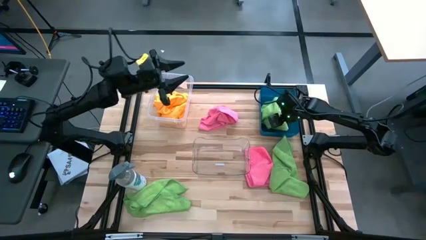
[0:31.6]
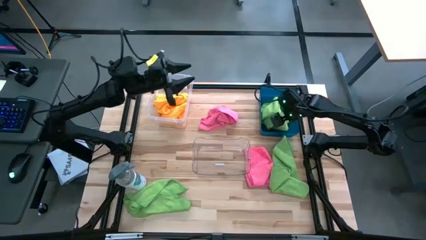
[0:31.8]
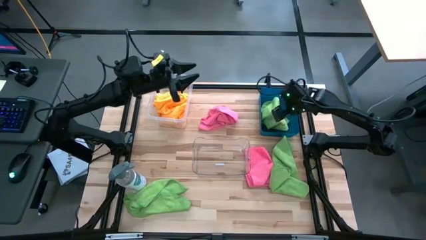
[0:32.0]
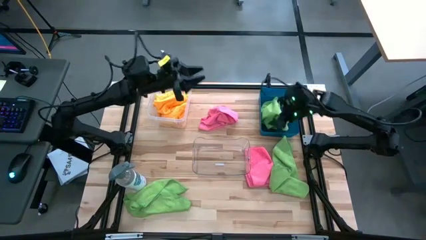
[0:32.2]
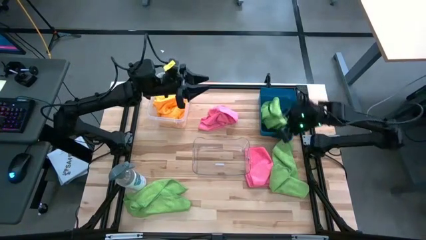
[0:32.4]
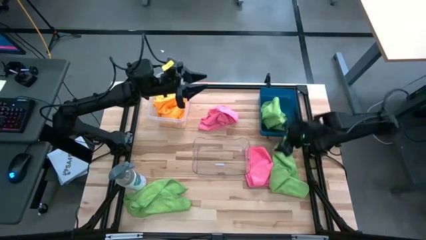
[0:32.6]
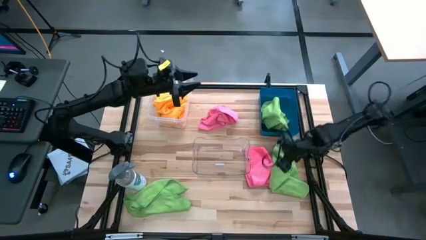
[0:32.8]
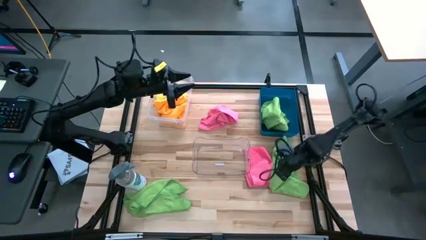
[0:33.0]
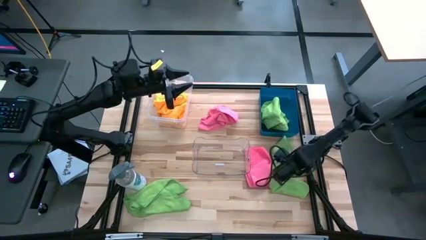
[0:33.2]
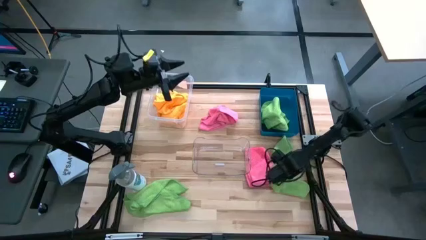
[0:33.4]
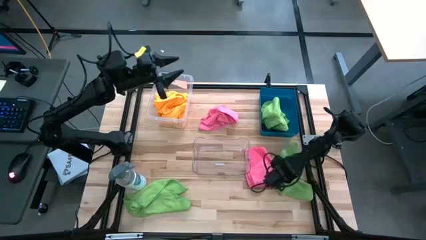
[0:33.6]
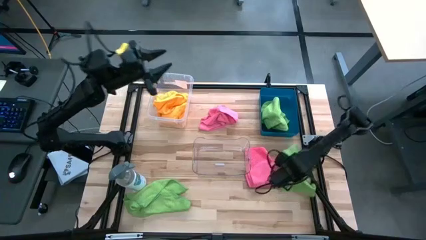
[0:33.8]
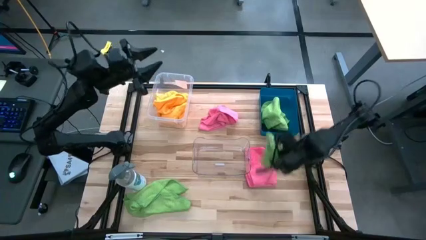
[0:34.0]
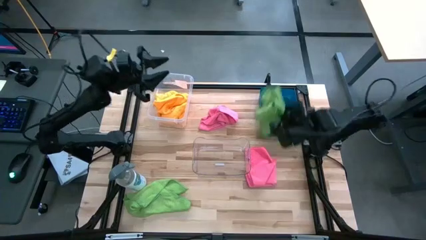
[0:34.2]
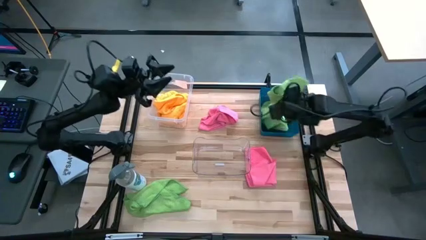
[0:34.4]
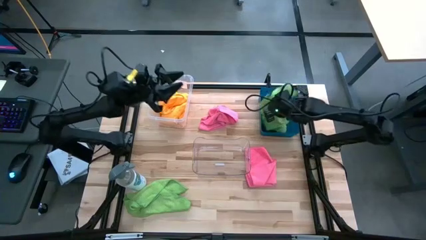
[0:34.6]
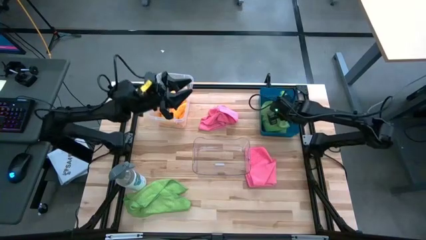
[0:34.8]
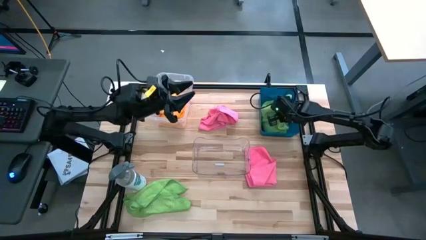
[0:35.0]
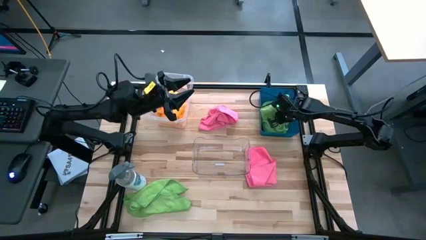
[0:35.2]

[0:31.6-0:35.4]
Task: Sort microfiber towel by color & place in baskets
Put the right green microfiber cloth into the blue bin

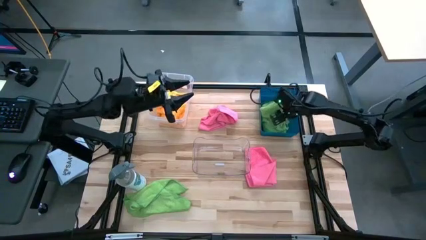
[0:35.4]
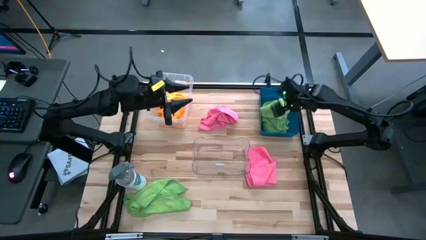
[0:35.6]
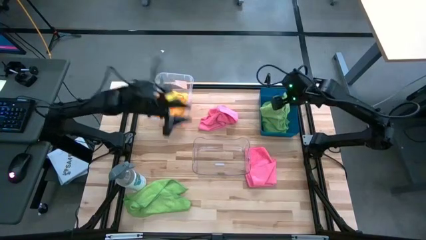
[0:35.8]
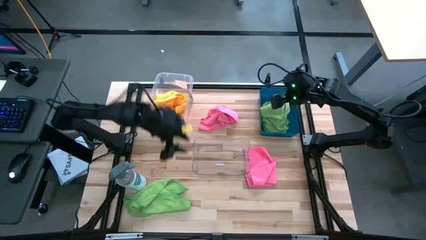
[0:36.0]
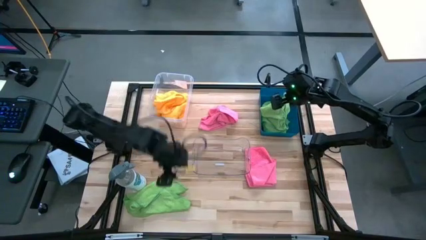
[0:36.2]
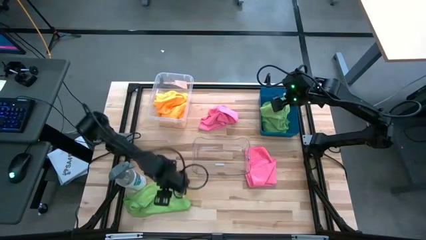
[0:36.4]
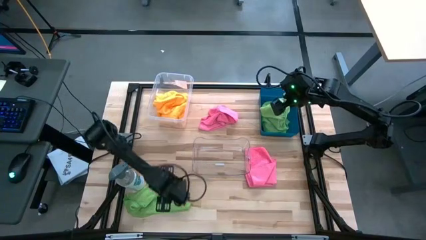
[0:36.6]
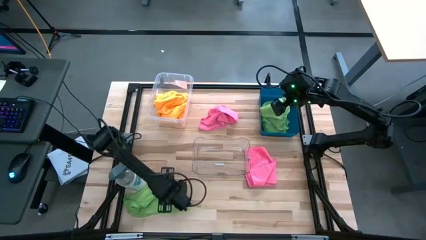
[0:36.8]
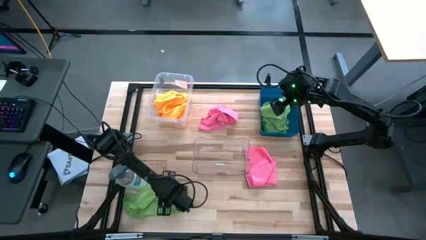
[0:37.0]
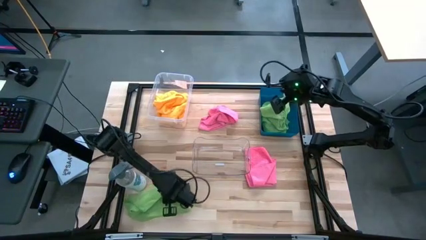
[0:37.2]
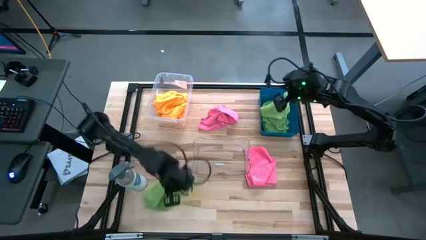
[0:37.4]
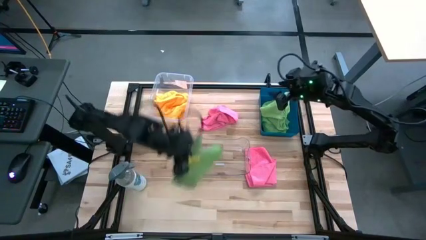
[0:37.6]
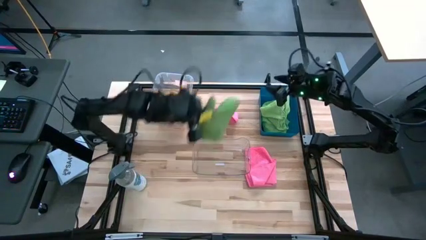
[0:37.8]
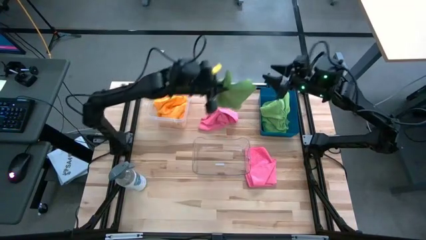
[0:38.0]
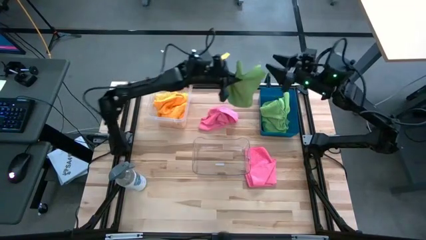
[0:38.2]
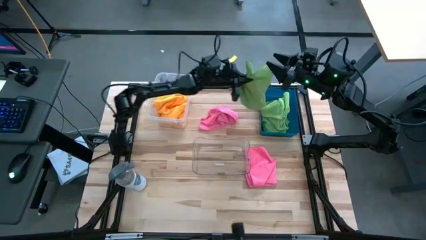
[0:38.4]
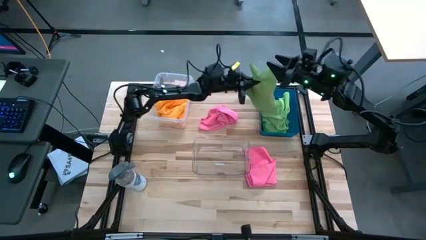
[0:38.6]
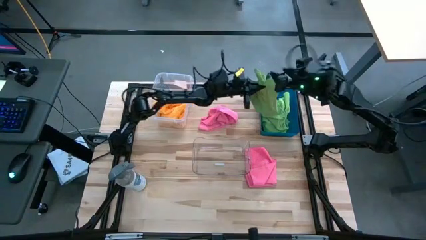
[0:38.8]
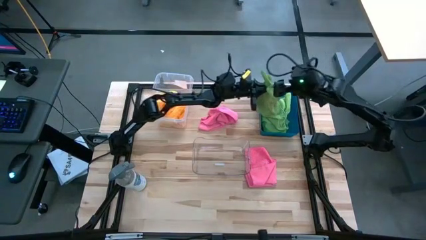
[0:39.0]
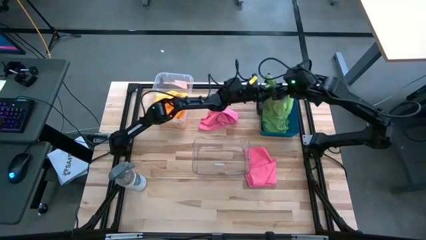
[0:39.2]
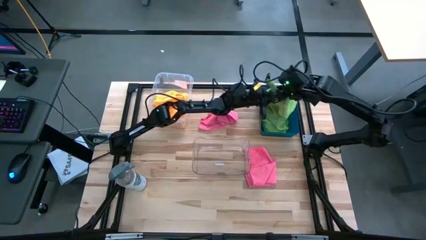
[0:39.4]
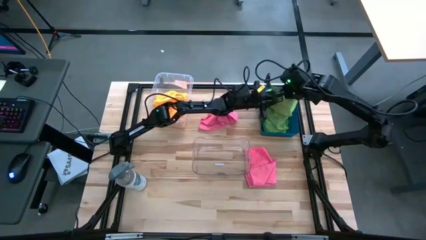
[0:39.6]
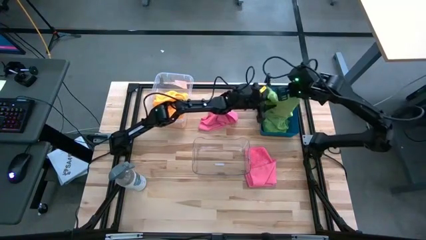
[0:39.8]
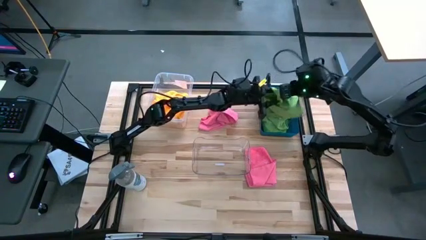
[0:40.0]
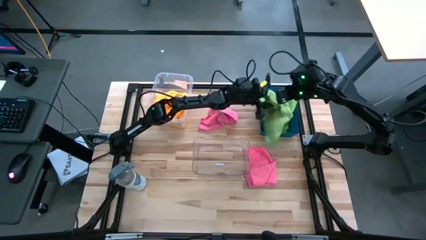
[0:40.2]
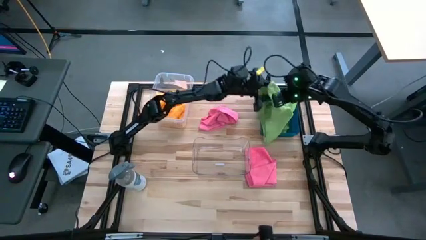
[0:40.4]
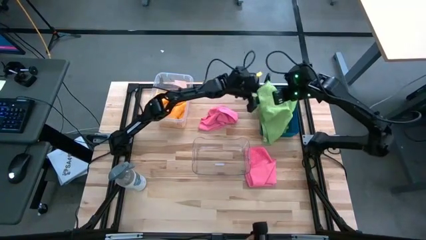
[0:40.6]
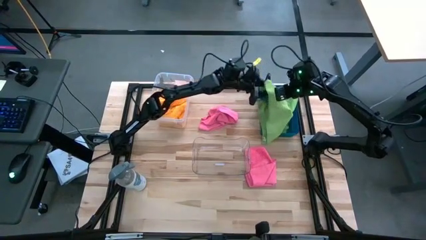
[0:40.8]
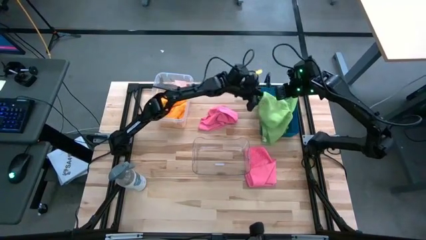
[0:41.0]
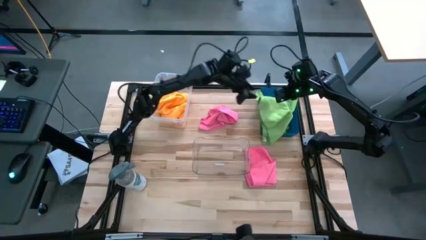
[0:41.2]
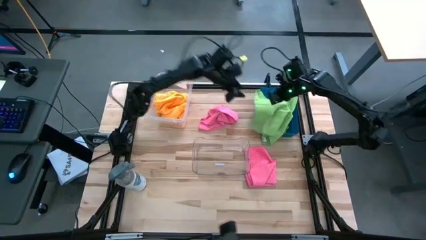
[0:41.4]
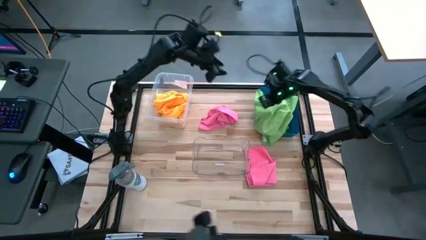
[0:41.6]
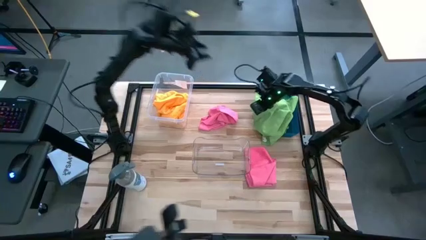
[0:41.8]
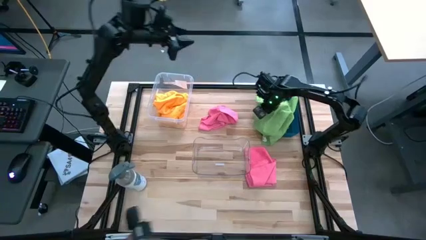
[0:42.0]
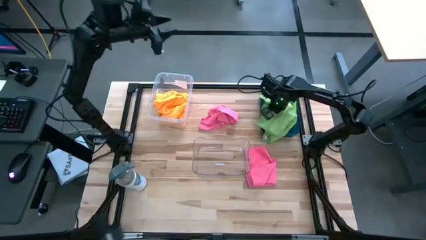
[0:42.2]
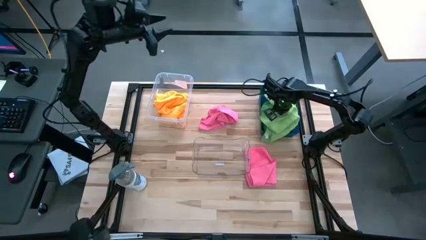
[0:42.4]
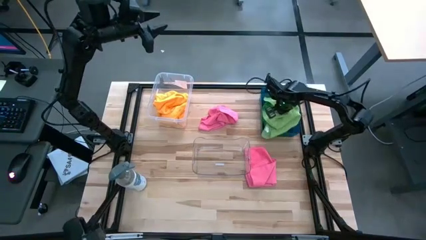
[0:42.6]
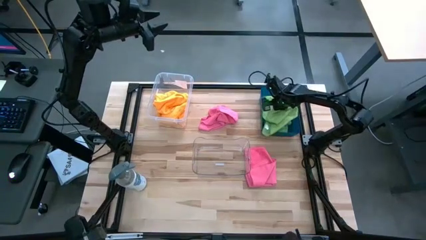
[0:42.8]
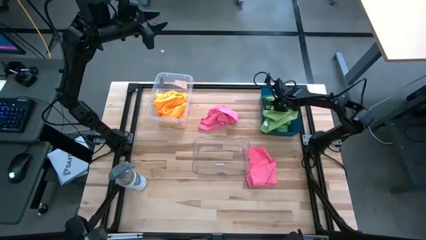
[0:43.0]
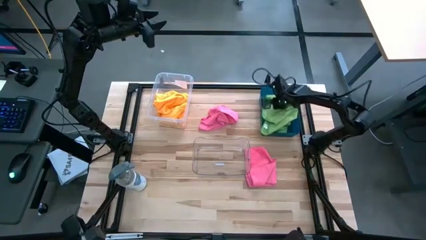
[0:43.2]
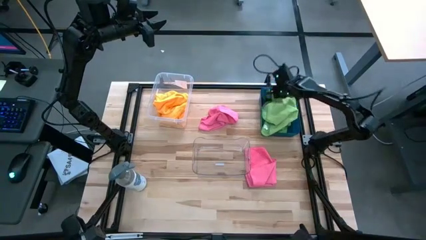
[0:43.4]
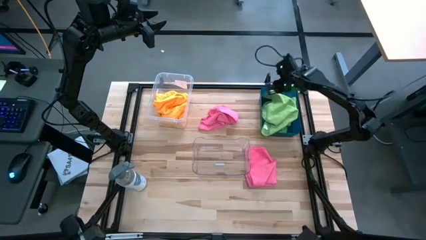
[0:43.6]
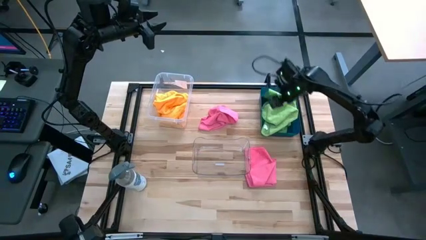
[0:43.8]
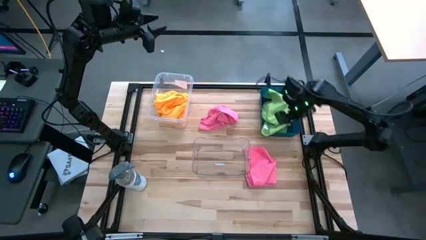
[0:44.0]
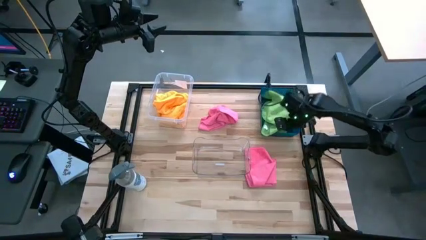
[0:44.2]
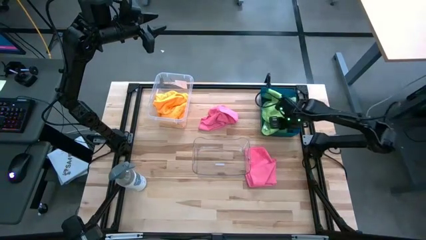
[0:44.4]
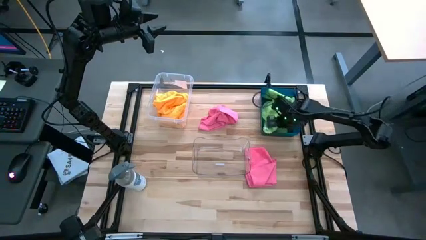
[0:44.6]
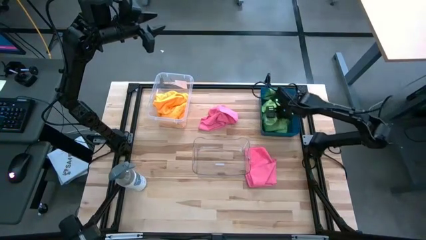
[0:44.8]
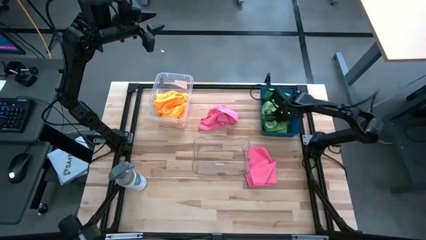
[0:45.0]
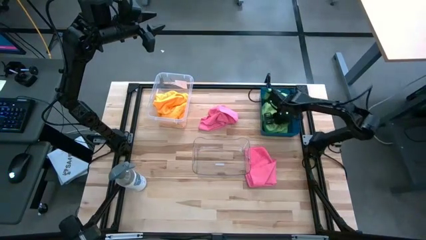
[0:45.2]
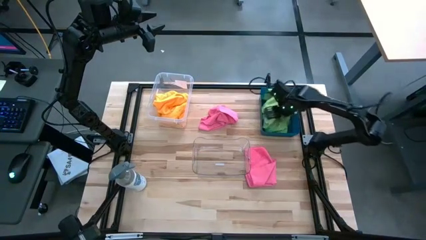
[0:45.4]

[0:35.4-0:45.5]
Put the green microfiber cloth into the blue bin

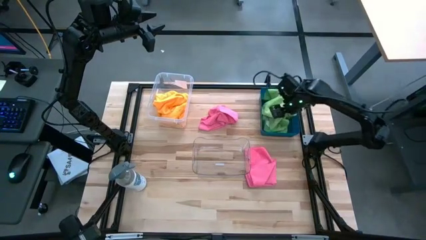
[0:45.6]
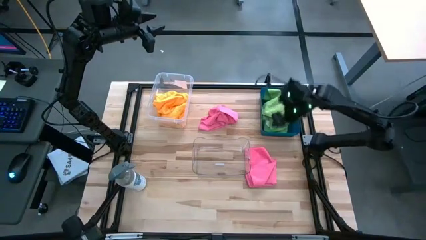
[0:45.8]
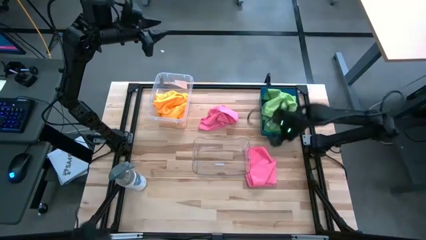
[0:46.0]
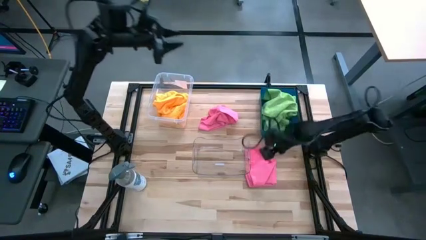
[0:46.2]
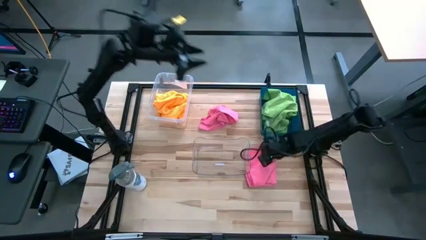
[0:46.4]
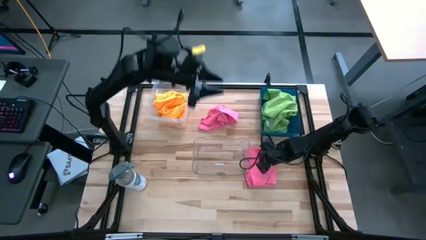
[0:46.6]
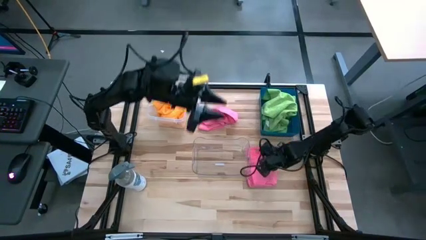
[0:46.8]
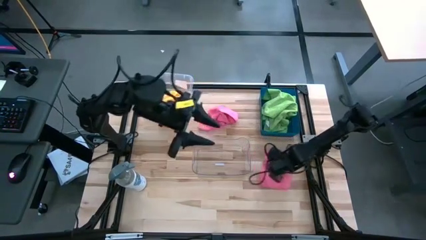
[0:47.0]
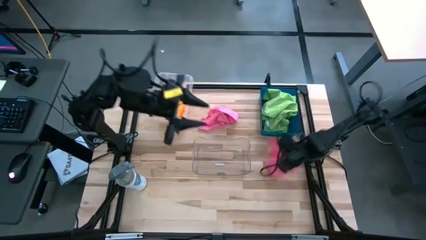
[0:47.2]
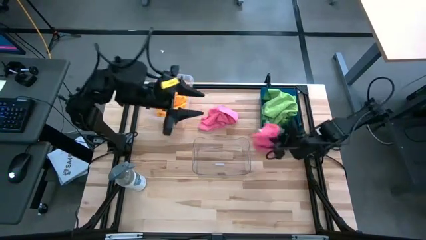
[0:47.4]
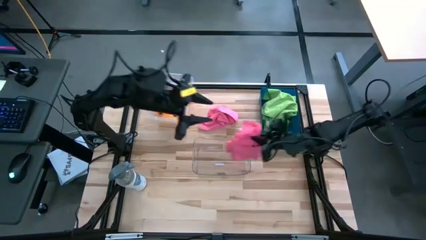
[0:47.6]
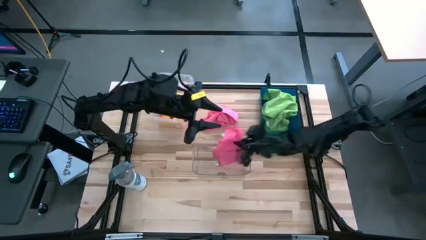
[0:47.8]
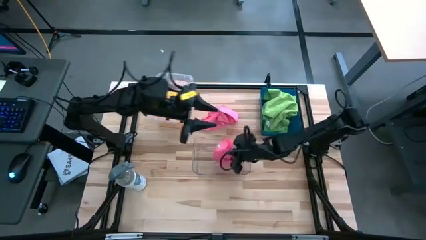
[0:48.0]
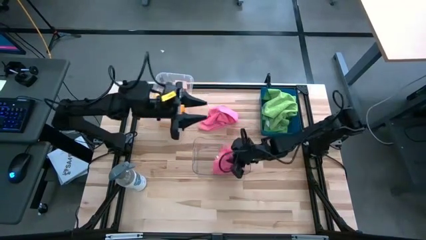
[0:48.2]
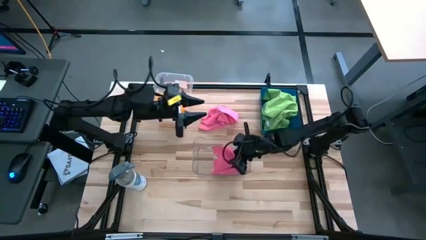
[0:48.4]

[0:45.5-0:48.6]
Put the bottom pink microfiber cloth into the bottom transparent bin
